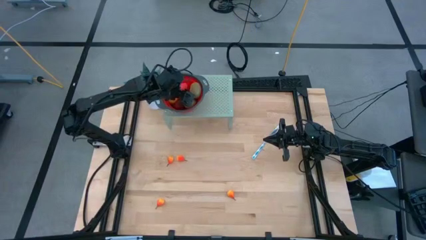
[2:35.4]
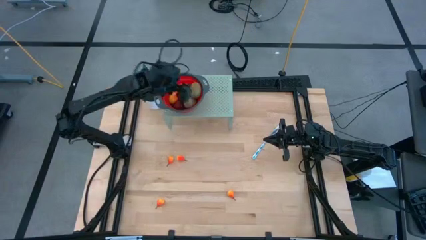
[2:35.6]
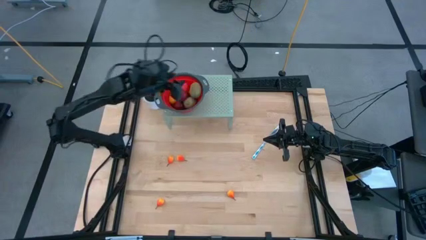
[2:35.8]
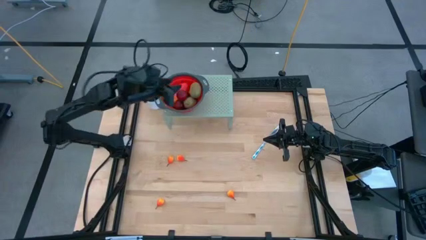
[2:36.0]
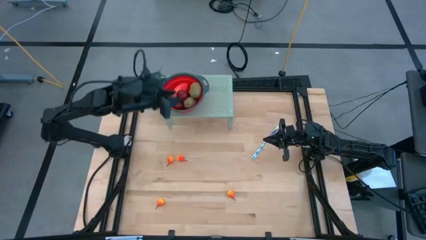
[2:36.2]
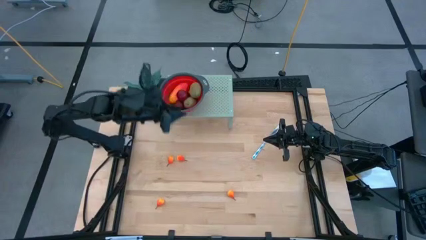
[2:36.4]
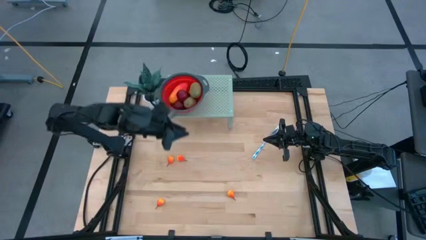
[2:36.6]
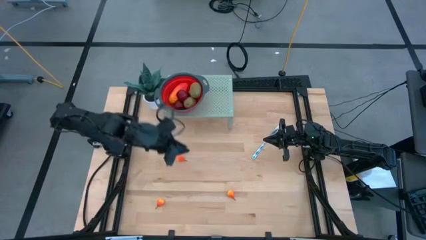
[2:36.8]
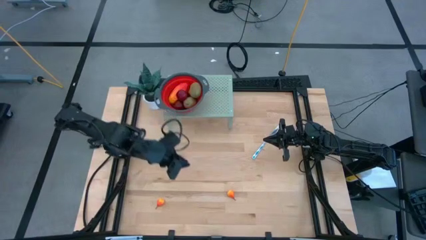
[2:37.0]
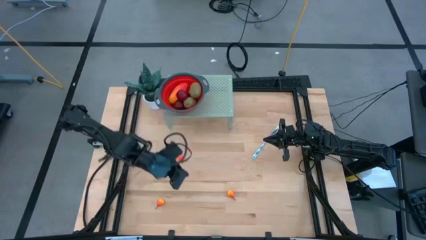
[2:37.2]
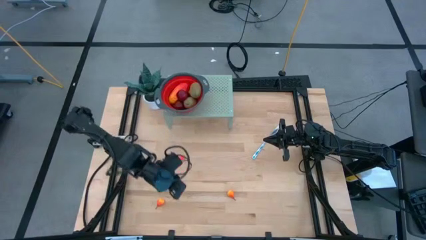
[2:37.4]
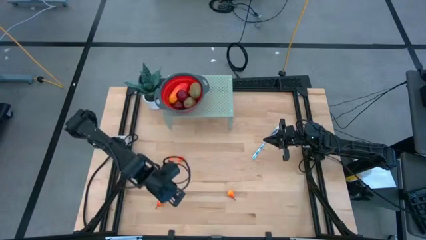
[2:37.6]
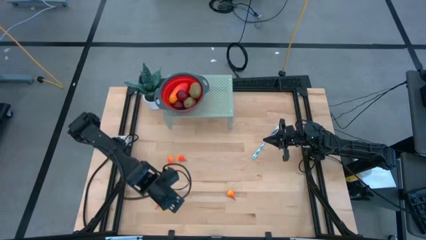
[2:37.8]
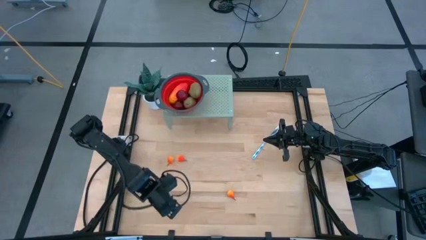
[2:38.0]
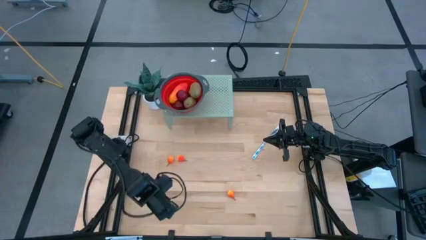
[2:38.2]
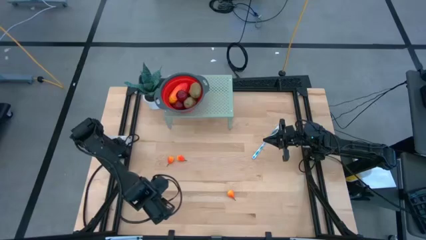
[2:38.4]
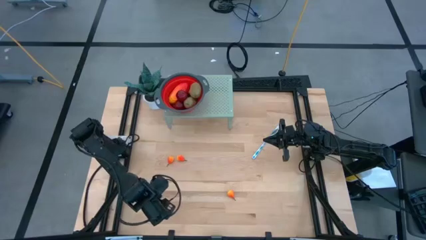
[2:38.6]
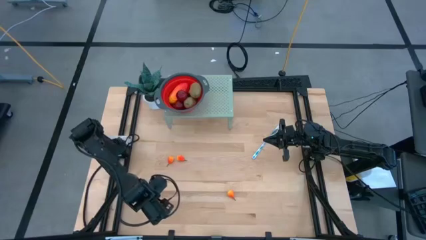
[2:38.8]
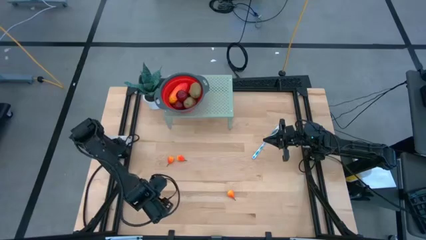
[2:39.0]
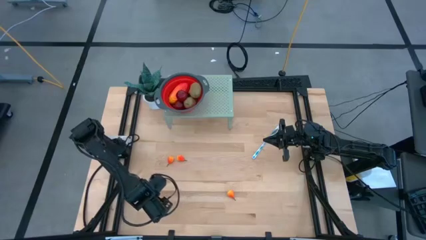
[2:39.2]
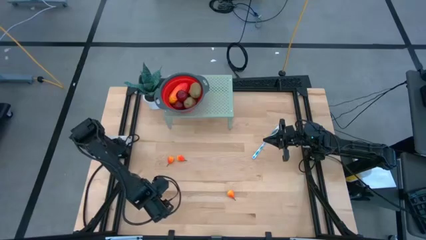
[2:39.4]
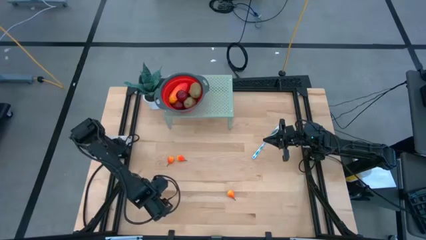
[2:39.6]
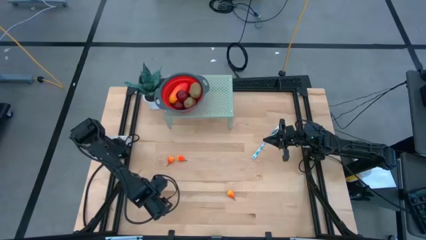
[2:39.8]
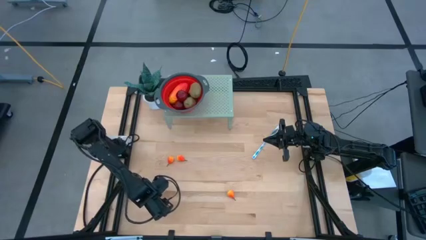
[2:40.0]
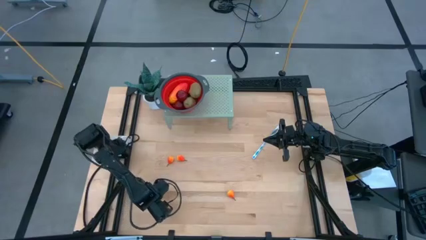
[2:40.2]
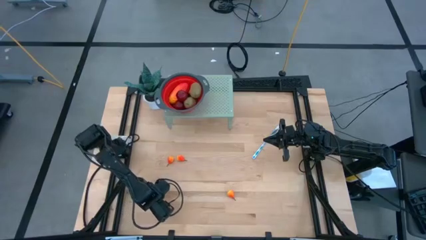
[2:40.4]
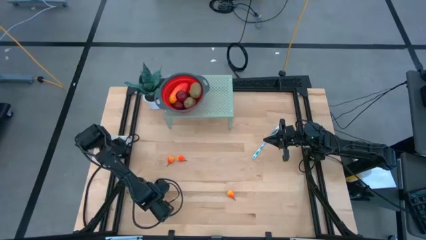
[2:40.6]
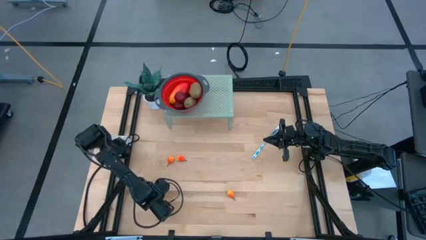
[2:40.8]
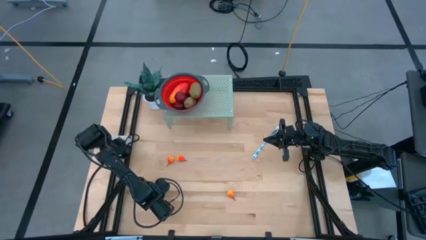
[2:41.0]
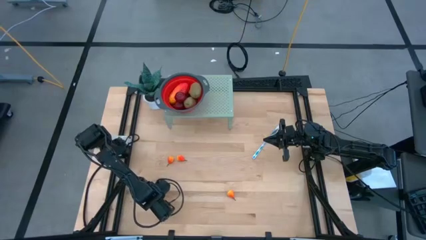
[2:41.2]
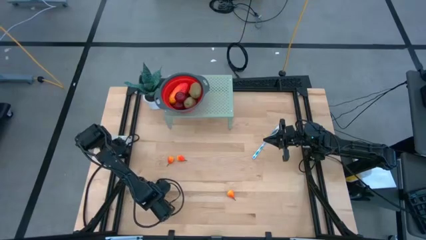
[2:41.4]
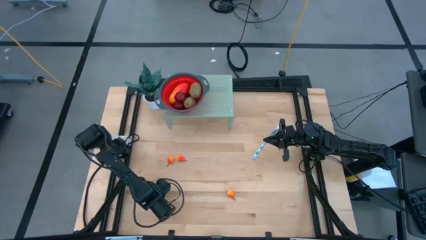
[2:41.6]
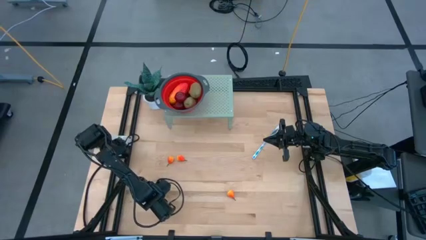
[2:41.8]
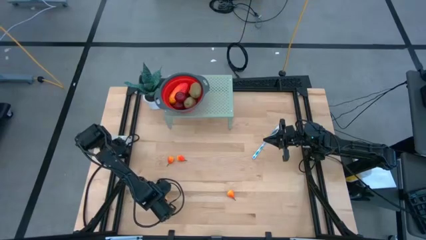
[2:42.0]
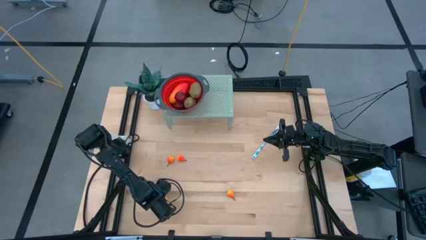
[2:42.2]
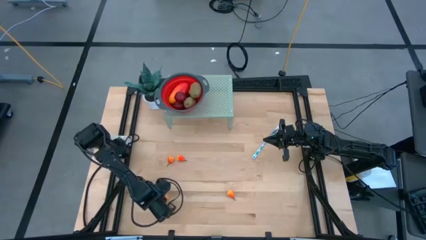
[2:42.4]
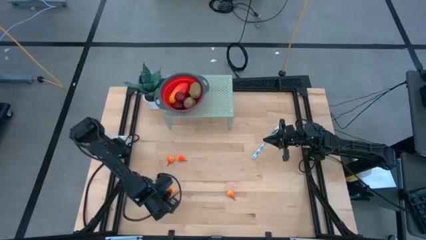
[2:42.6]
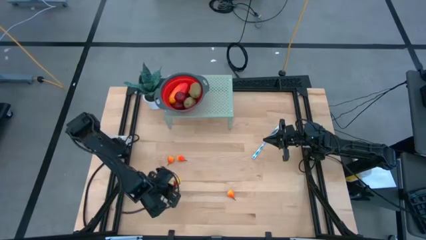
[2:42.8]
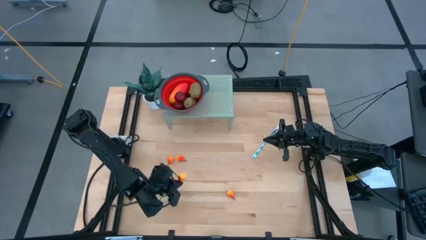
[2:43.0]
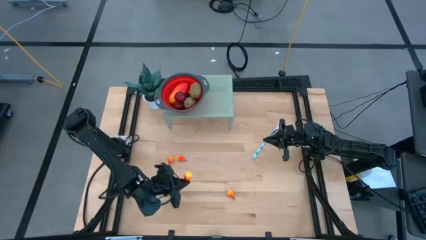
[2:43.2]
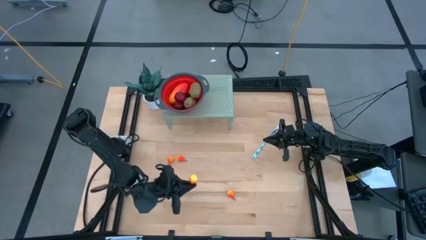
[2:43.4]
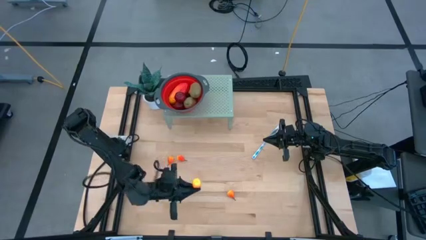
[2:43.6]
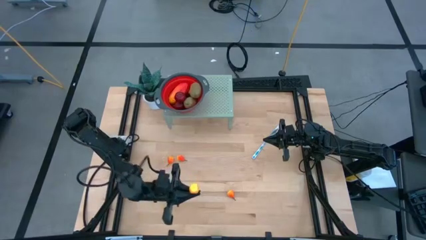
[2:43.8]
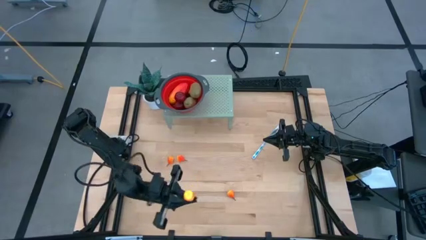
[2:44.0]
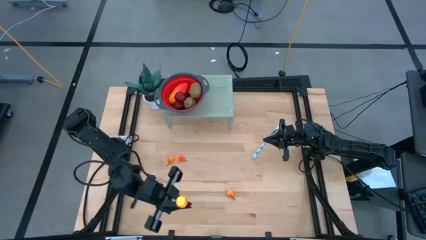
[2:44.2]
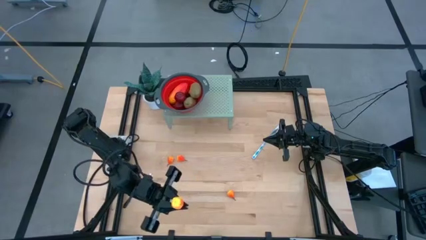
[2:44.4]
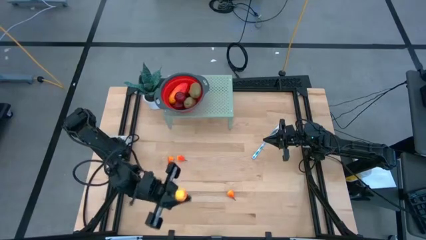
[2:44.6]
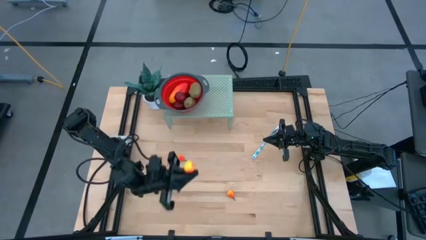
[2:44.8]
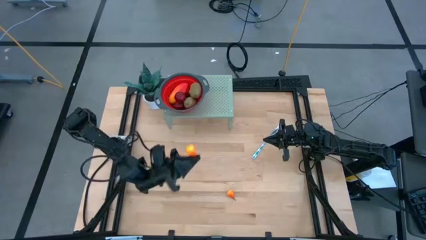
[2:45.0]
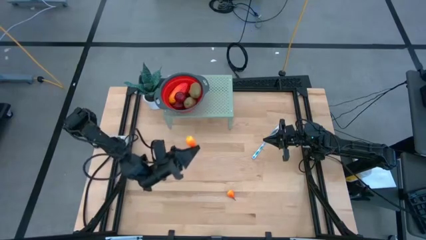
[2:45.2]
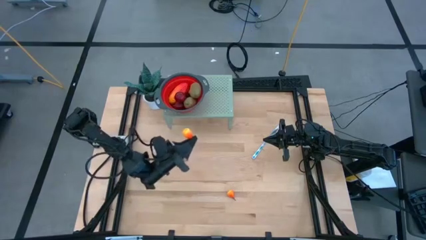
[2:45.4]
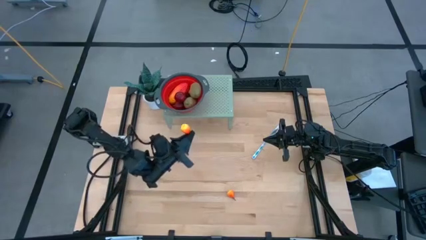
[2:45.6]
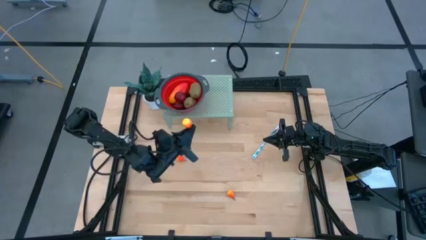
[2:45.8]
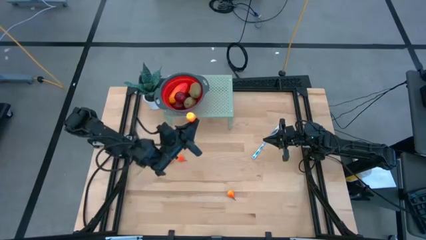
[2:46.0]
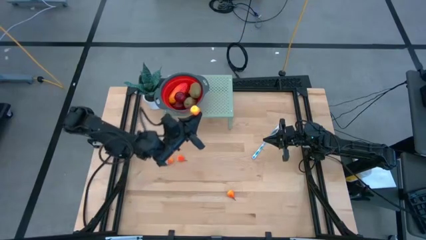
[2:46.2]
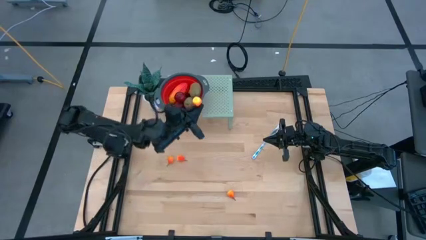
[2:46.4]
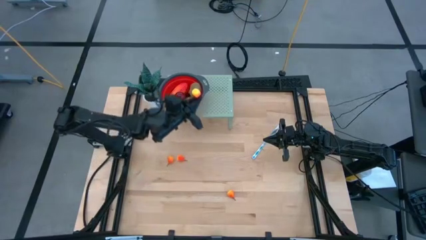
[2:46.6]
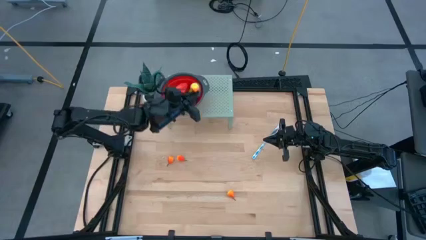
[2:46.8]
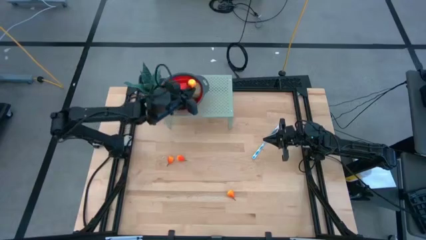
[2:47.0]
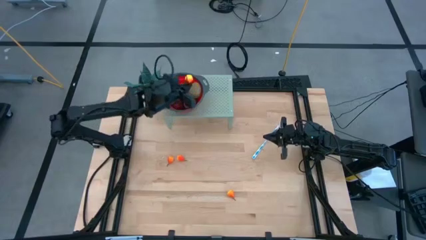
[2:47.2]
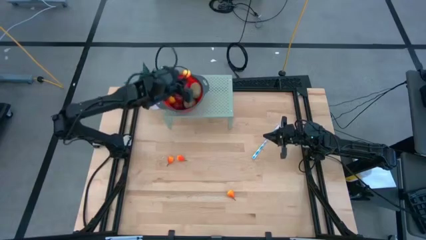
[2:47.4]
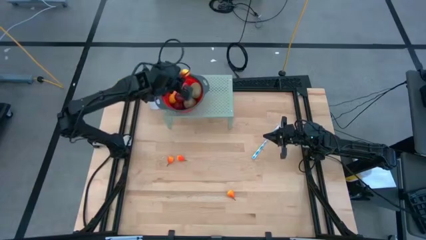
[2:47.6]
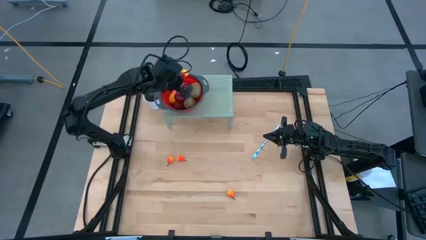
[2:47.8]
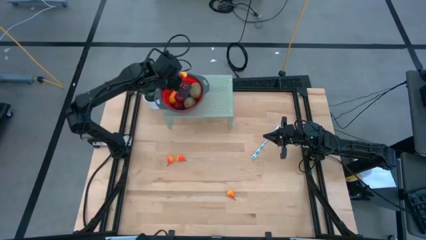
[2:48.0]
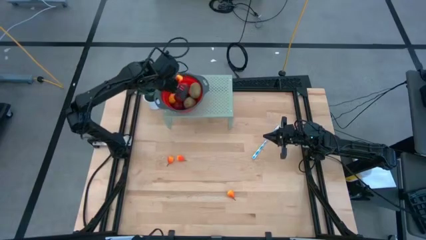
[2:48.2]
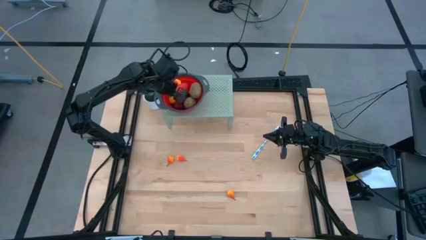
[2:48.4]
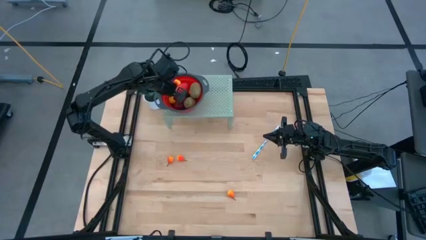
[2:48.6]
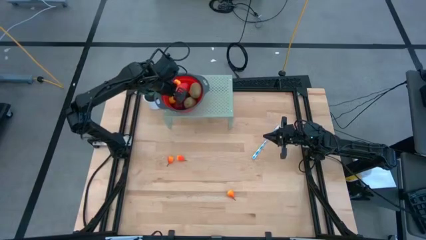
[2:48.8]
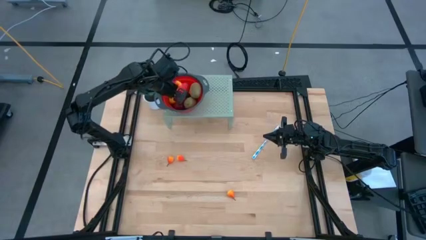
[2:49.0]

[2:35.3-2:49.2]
Task: Pick & Place Fruit
Put the pear into the red strainer bowl on the shelf
